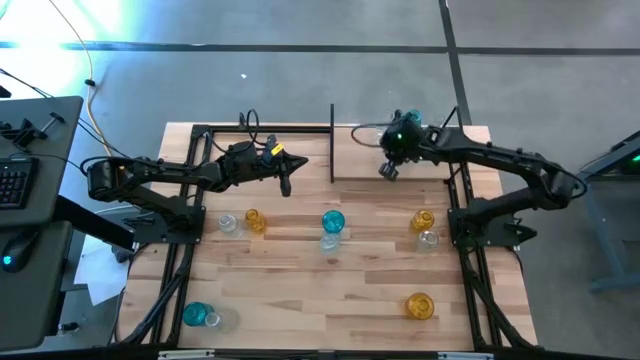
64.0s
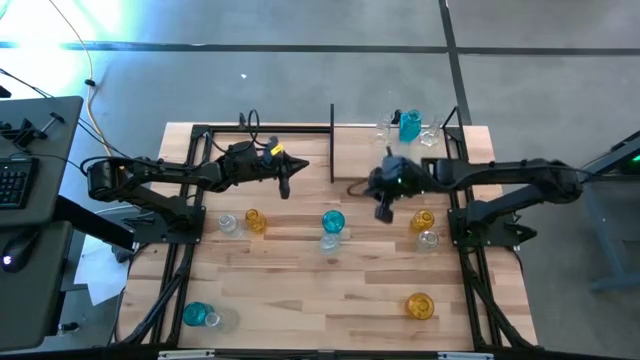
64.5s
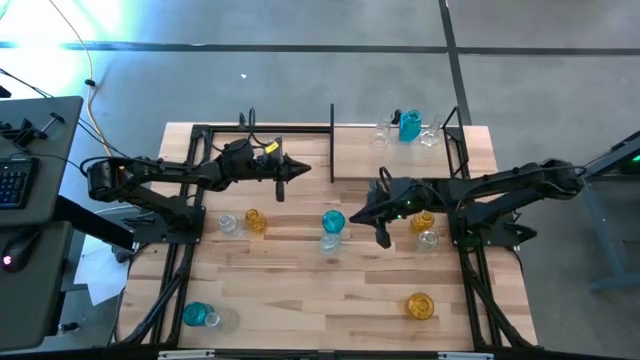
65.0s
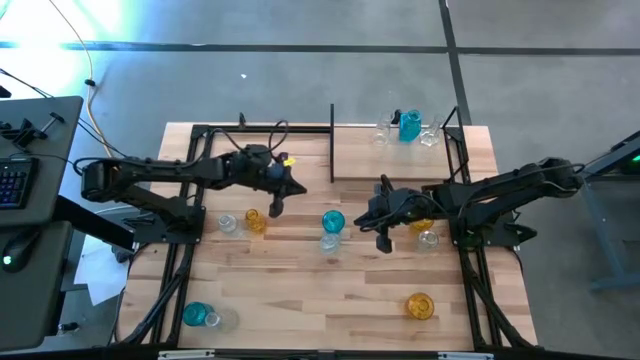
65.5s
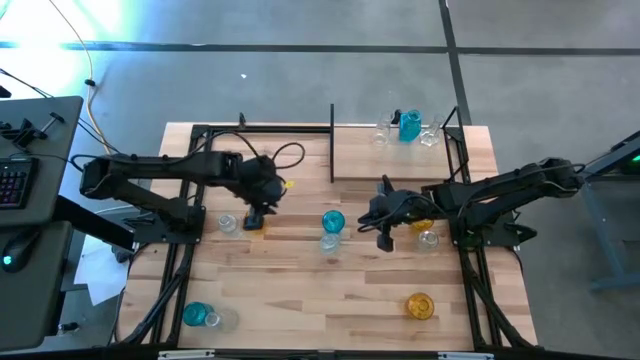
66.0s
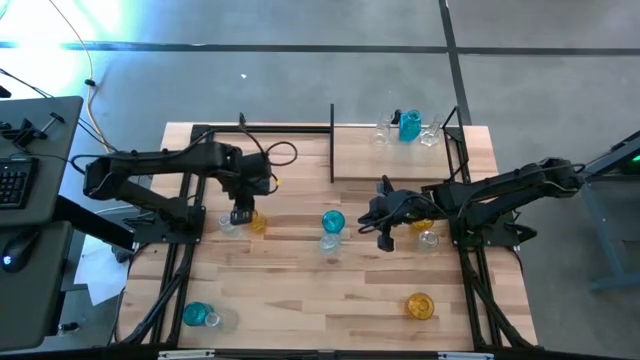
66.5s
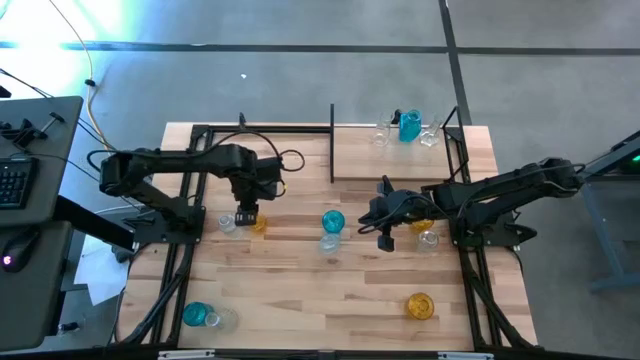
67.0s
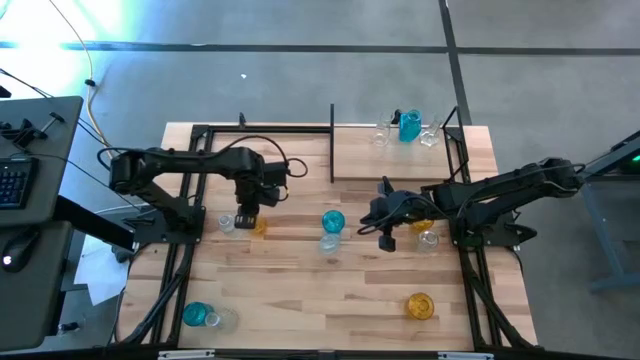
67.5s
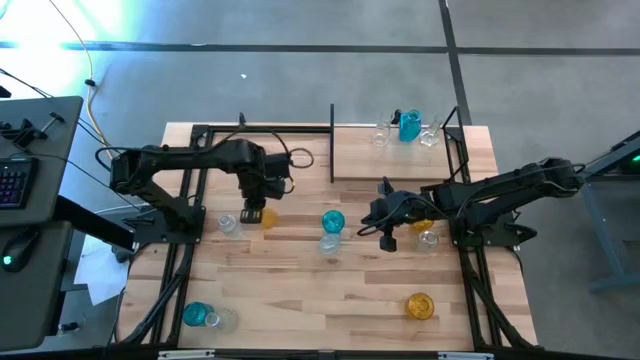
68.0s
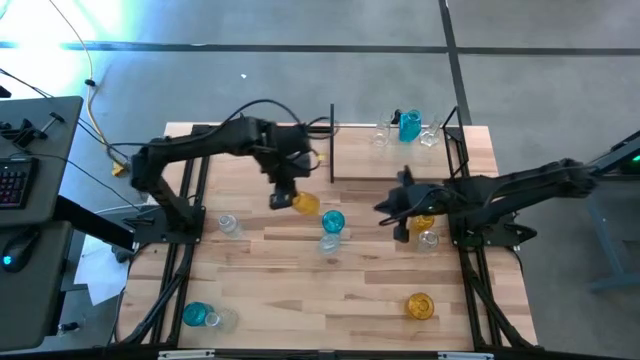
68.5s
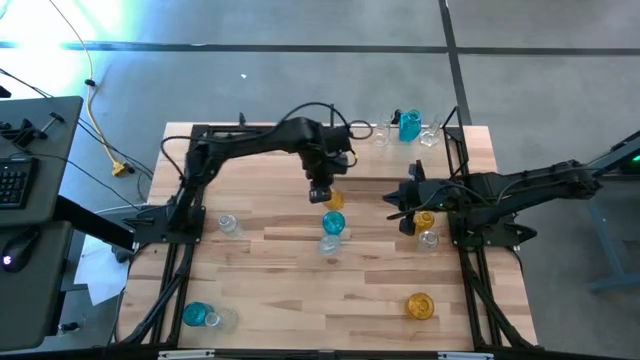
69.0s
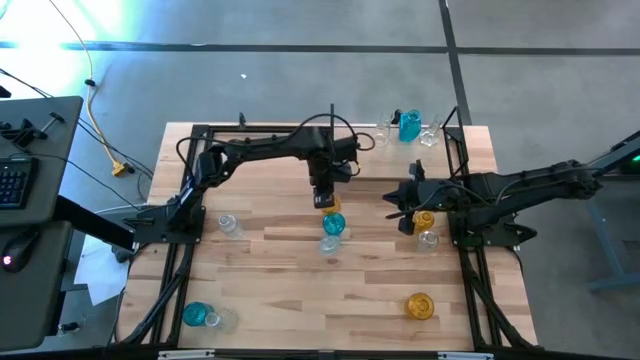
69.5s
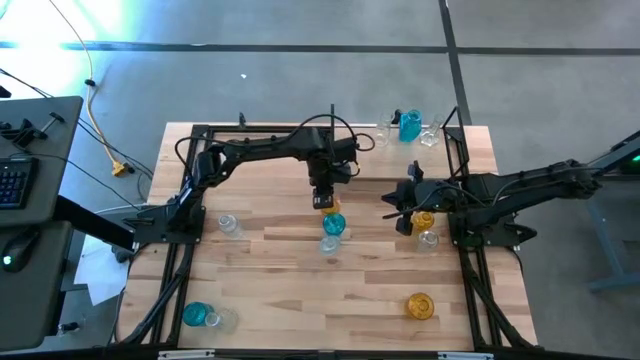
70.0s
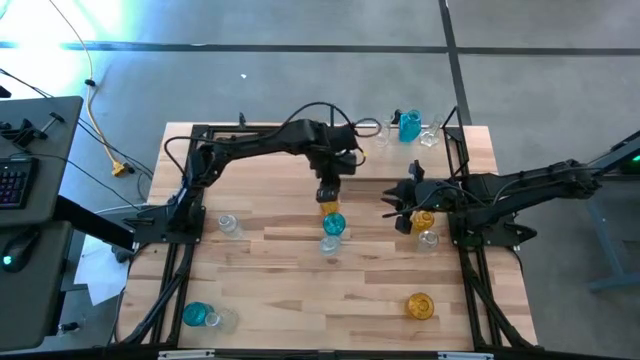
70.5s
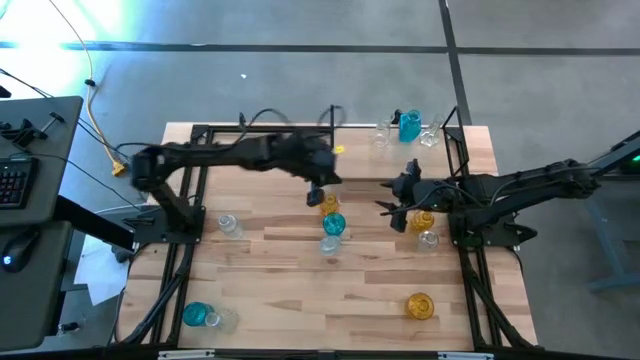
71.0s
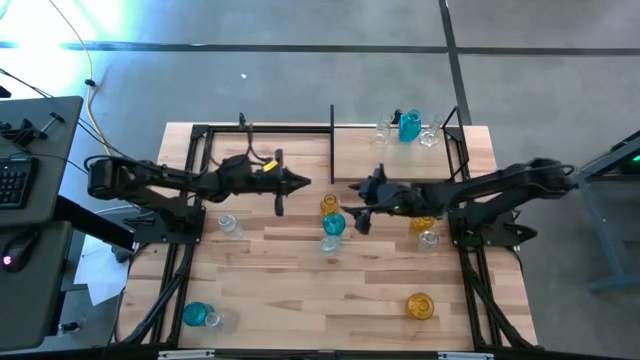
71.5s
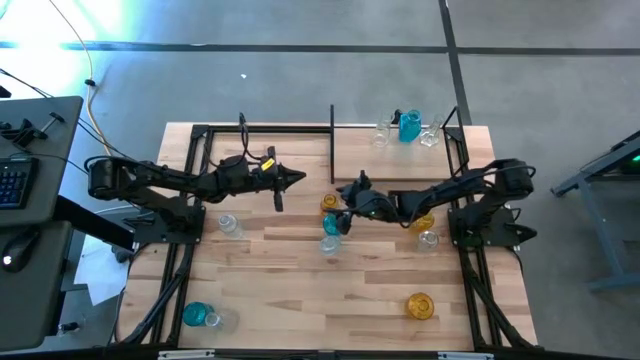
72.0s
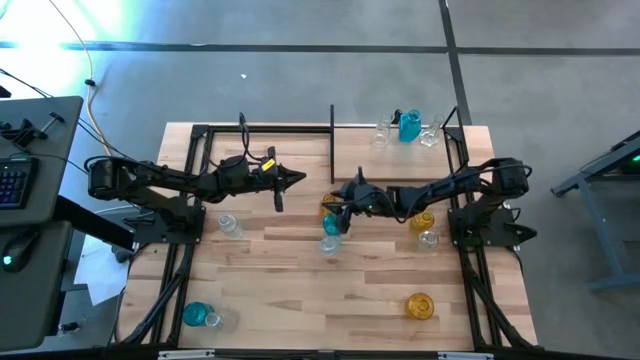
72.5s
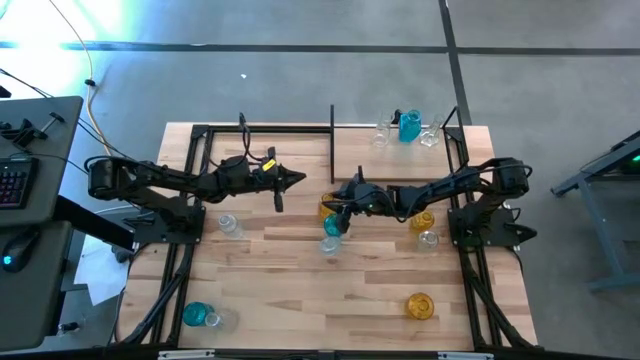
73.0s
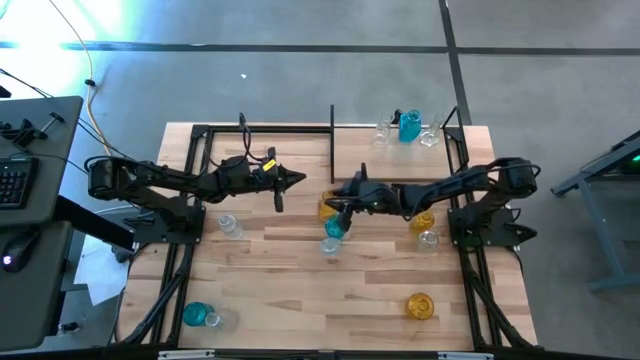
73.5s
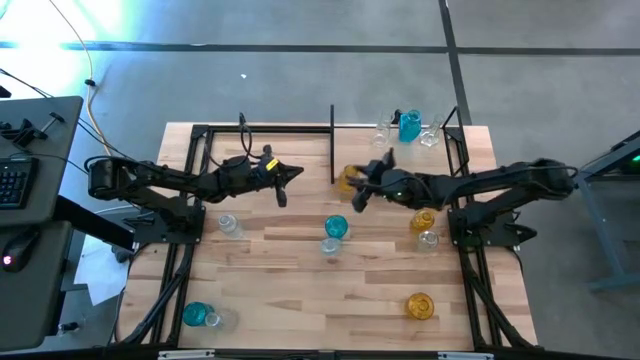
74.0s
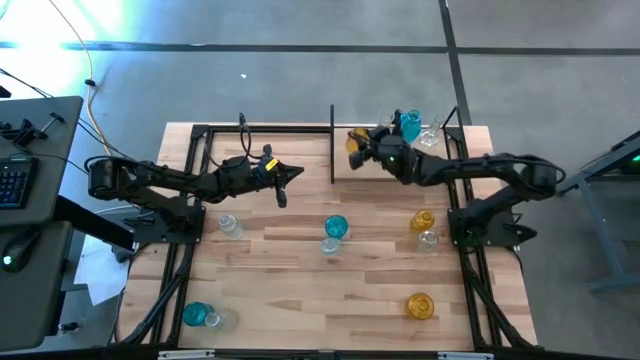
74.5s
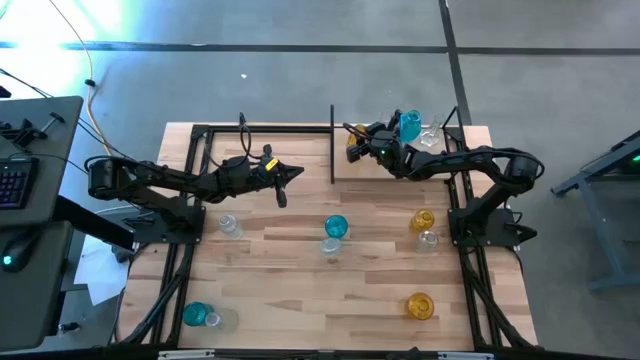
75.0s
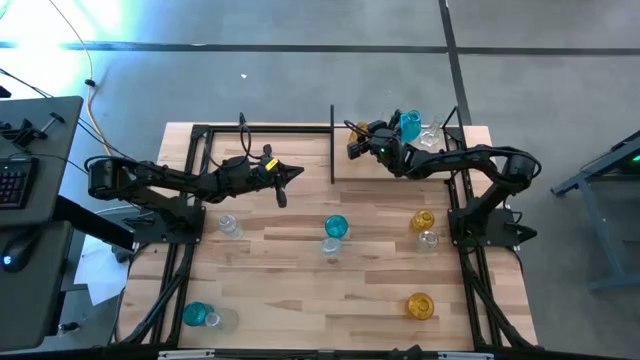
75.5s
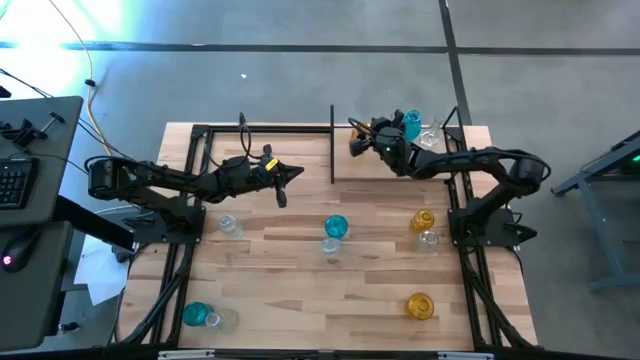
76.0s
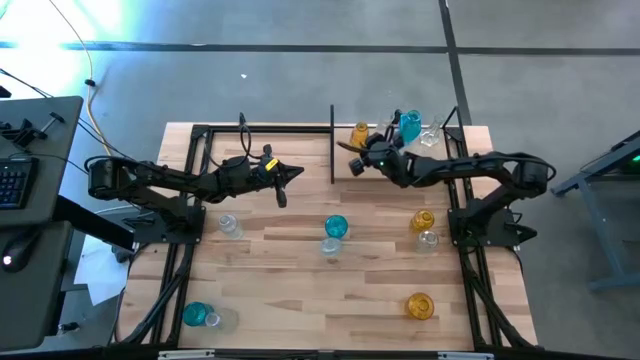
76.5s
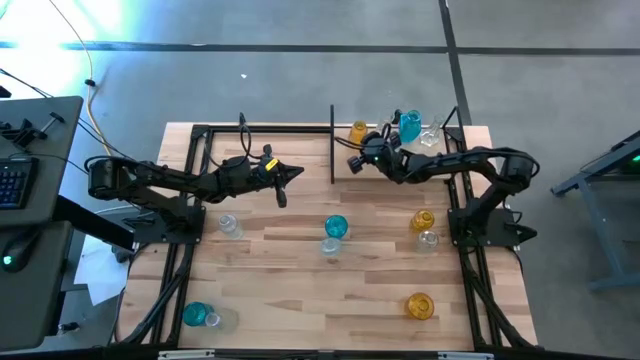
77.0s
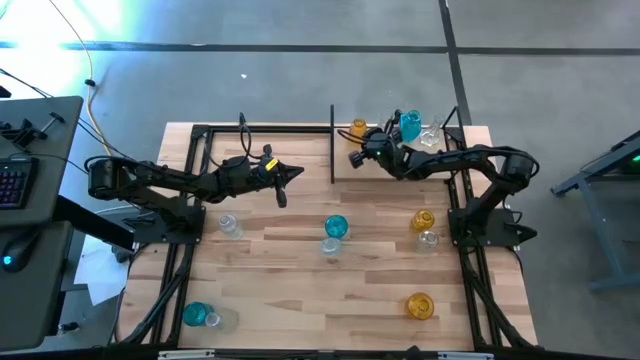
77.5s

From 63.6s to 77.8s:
Task: sort vases onto shelf
Put the left yellow vase on the shelf

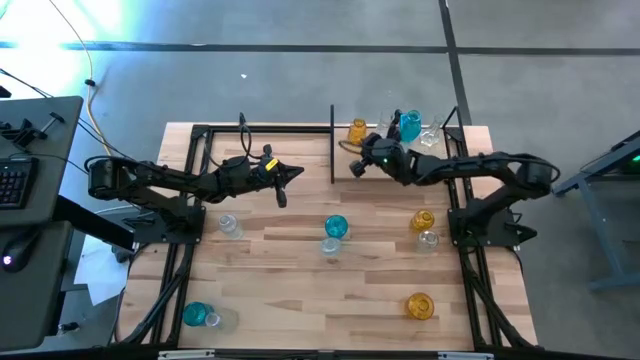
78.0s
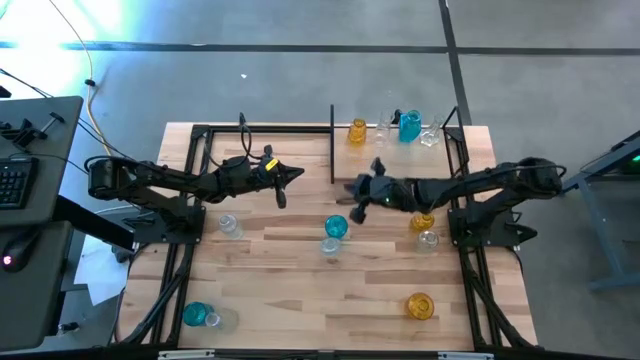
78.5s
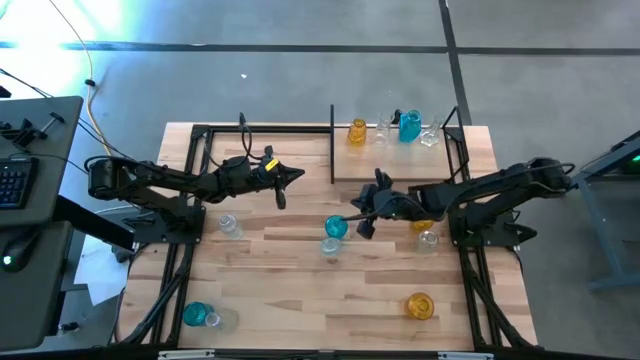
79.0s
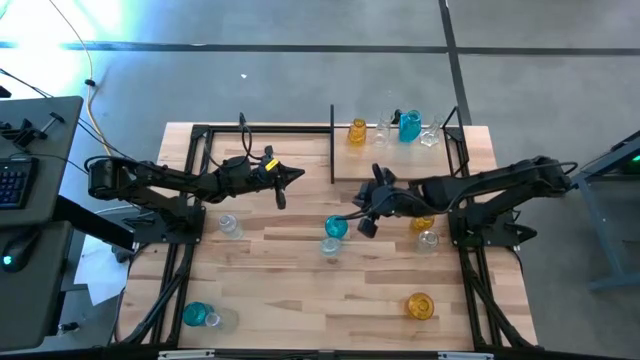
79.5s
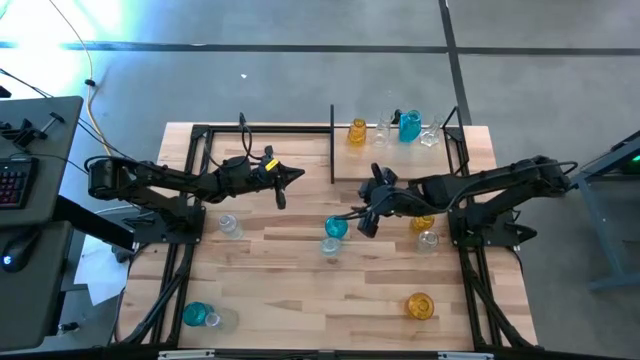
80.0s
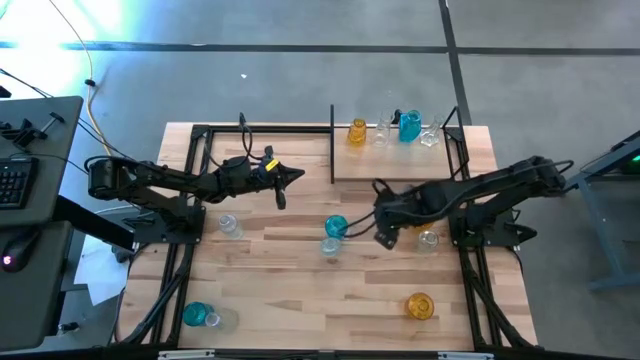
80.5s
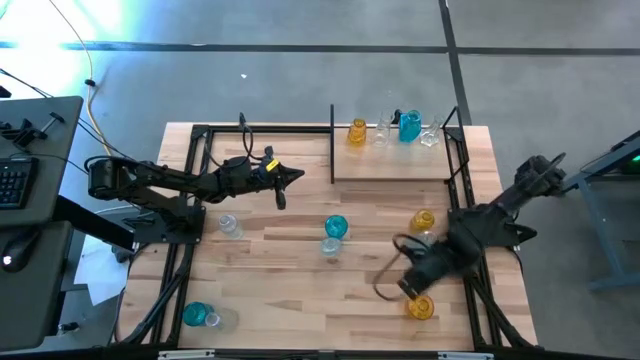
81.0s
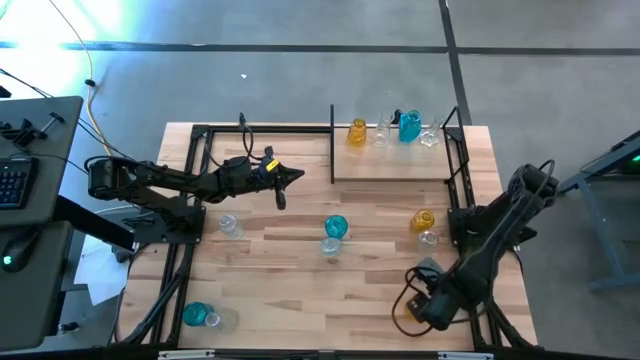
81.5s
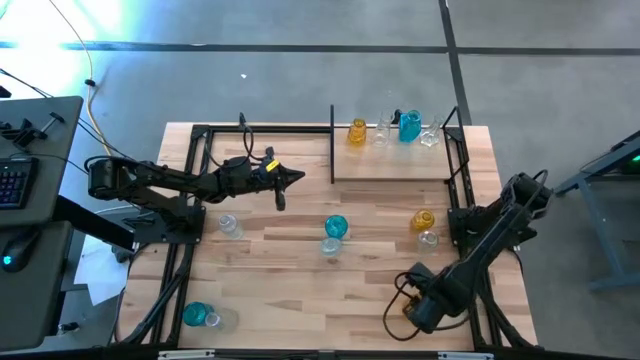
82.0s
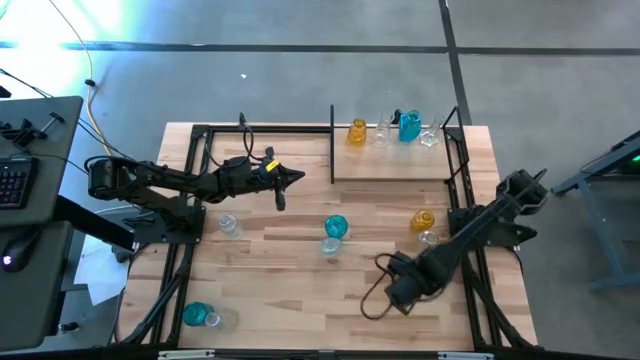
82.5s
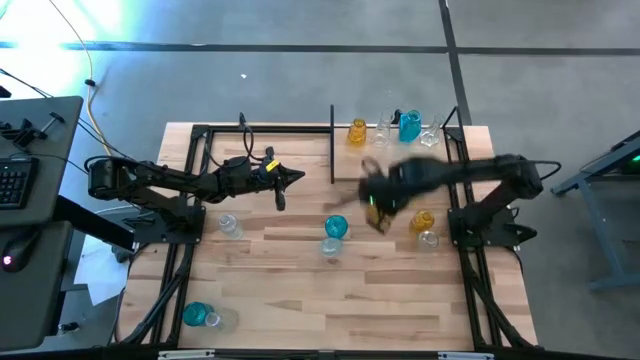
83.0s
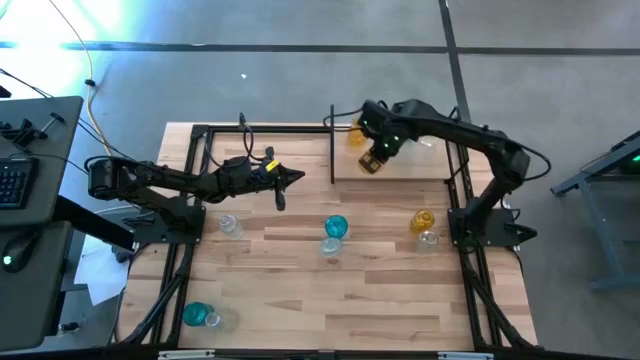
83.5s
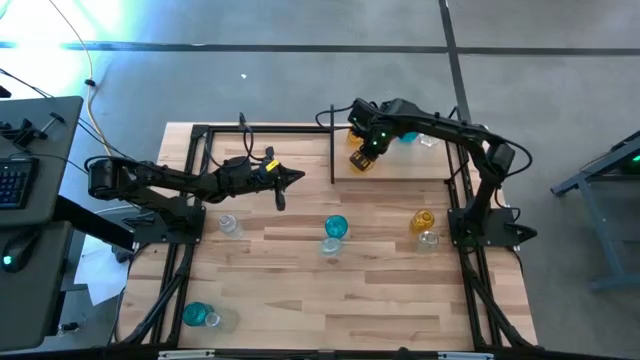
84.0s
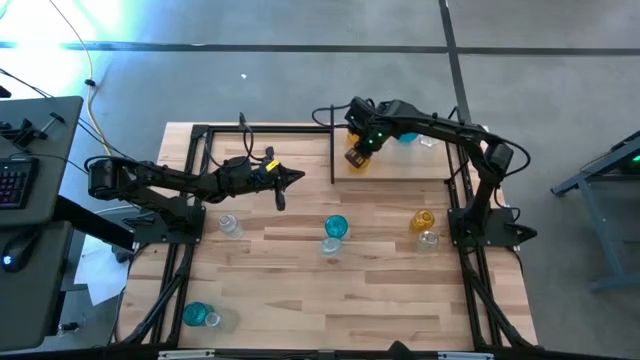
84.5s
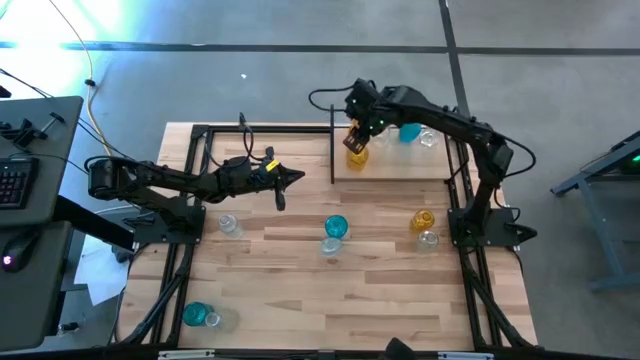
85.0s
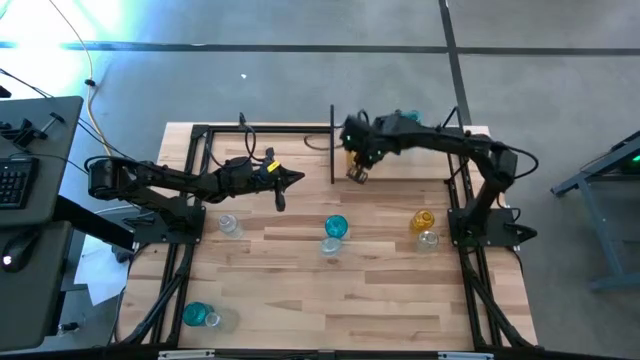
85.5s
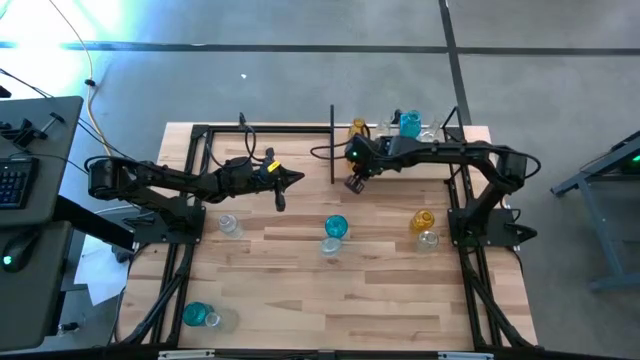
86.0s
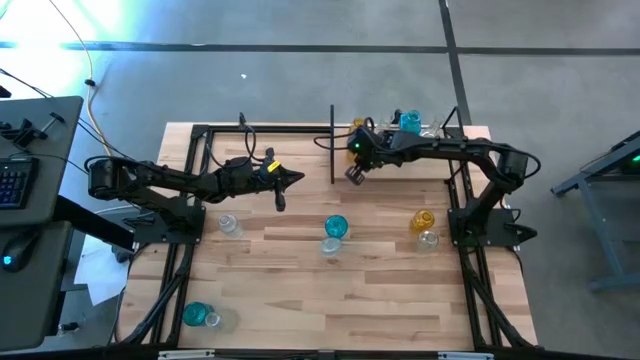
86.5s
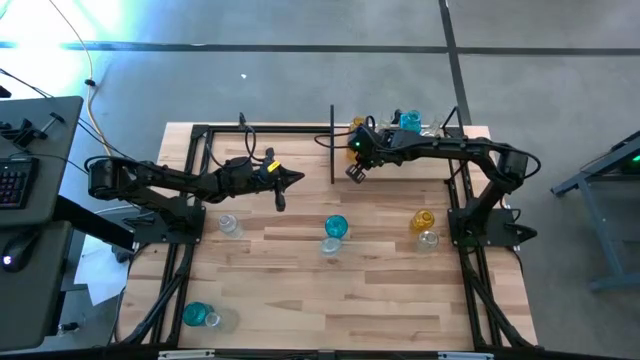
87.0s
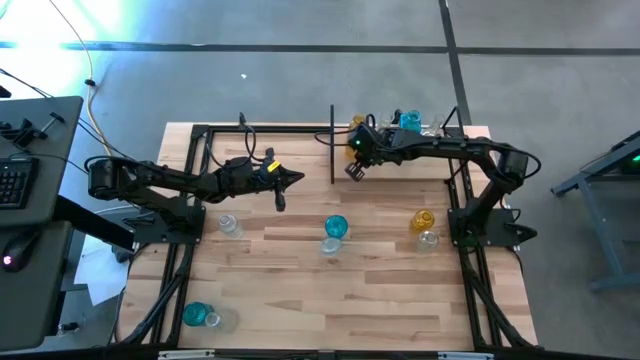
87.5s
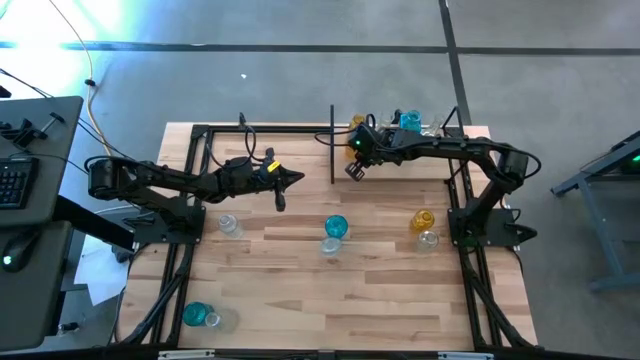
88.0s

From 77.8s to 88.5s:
Put the bottom yellow vase on the shelf aligned with the other yellow vase
